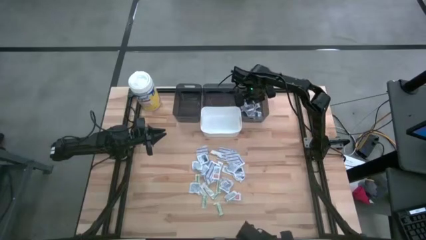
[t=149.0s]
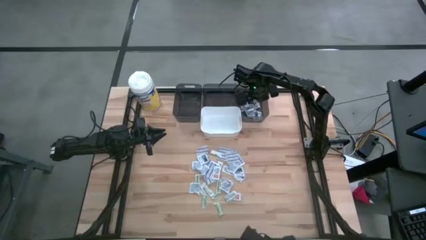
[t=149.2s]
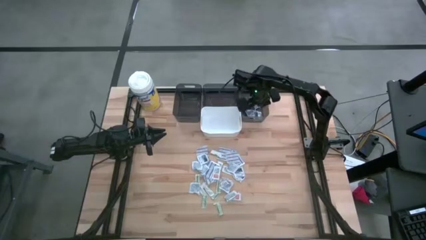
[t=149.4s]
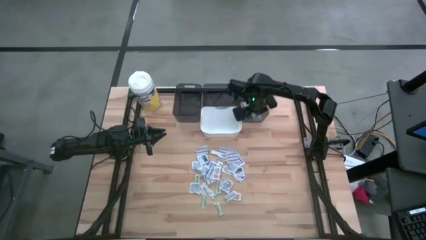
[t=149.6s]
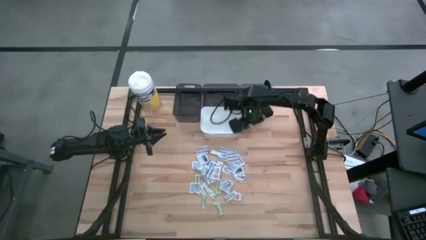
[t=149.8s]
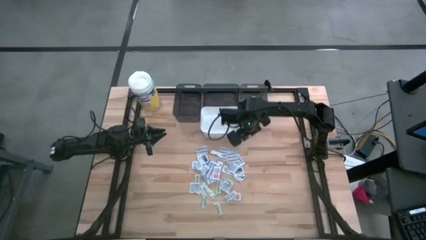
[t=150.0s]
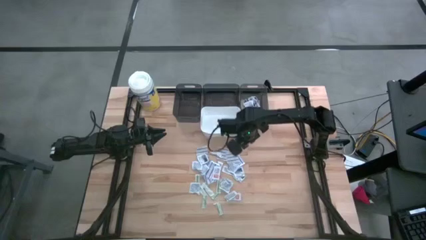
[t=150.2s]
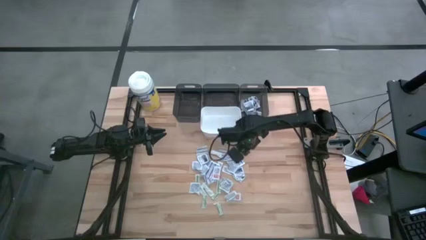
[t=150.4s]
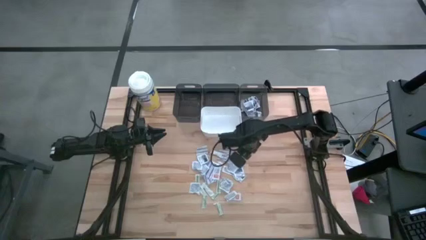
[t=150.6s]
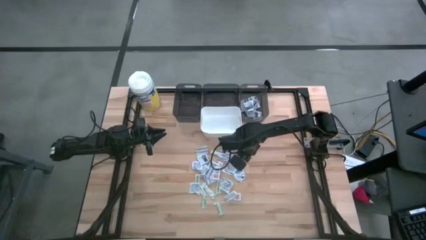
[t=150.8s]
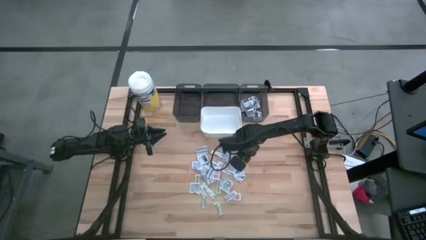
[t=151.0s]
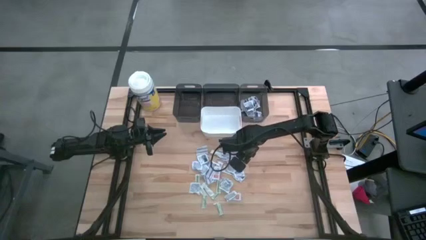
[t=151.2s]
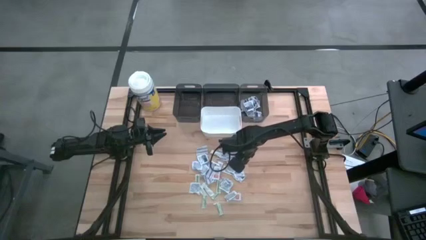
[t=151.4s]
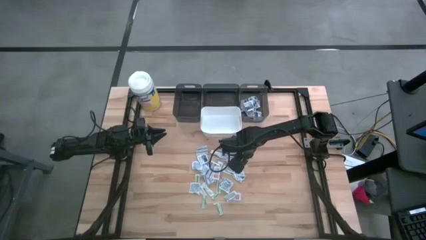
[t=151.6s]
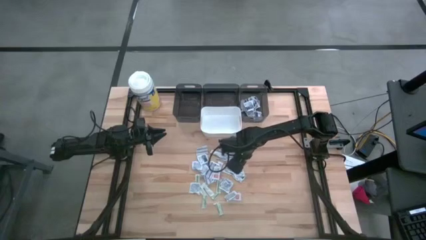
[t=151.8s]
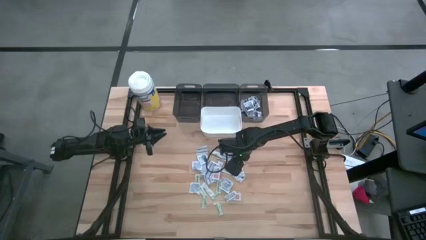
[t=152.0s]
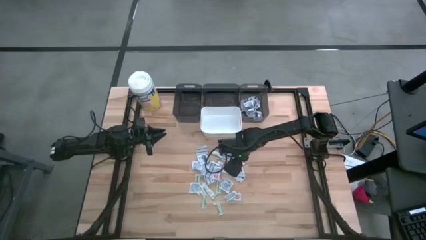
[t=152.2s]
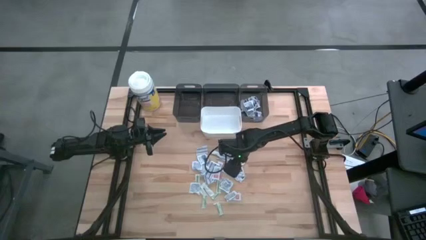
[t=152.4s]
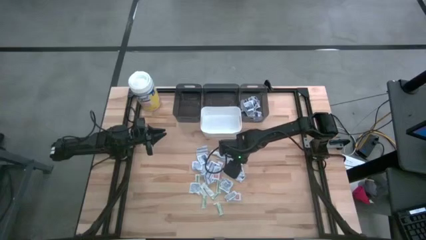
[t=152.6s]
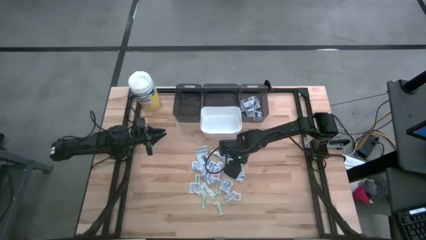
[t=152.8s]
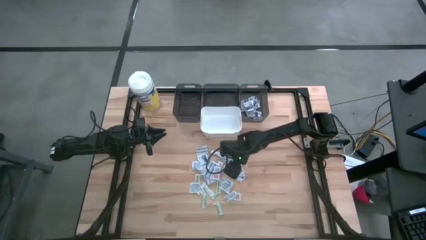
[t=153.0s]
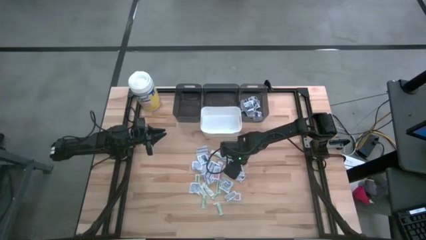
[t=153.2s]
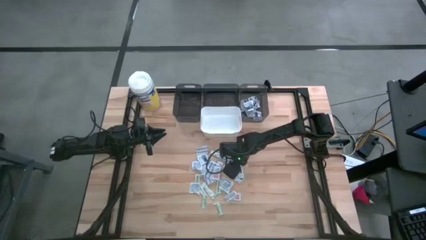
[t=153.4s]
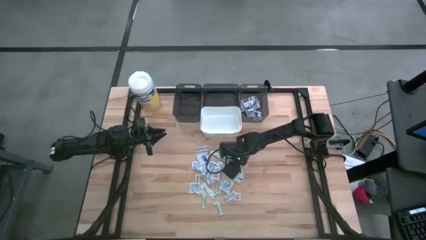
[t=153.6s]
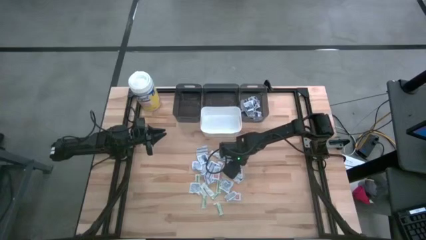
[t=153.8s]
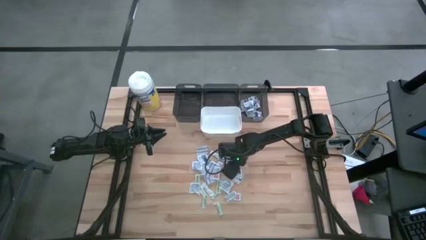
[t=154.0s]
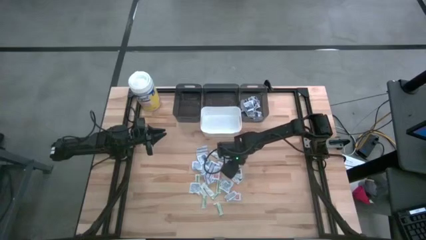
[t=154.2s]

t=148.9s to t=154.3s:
Task: Pick & Place First Aid Supplies
Put the blue alcohol pad into the right black bin

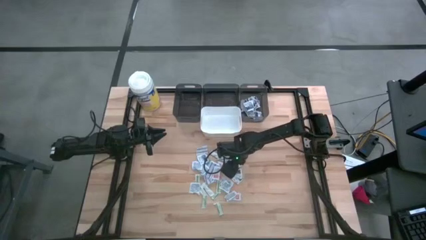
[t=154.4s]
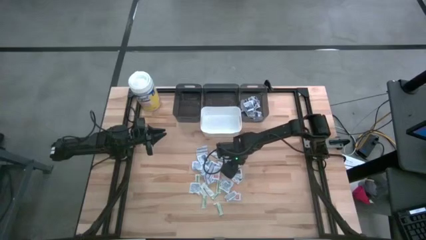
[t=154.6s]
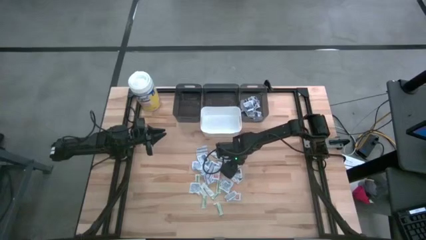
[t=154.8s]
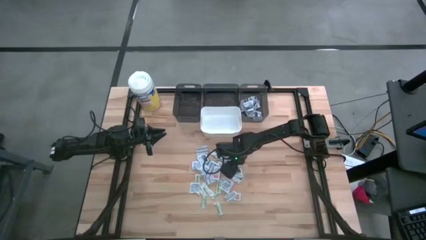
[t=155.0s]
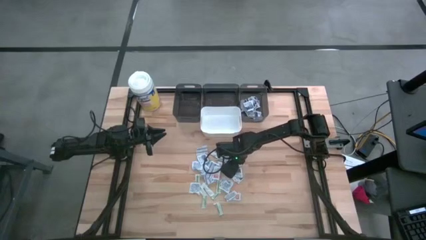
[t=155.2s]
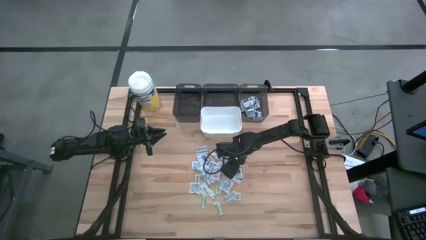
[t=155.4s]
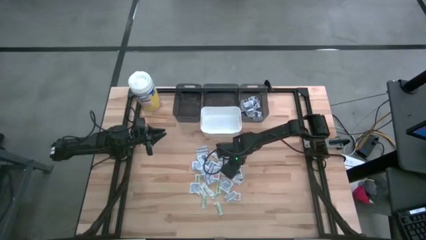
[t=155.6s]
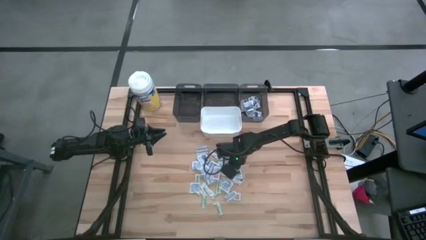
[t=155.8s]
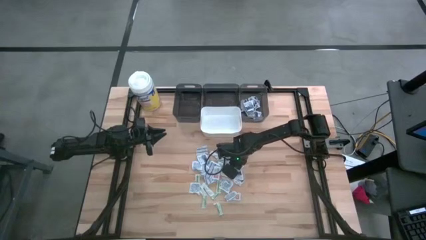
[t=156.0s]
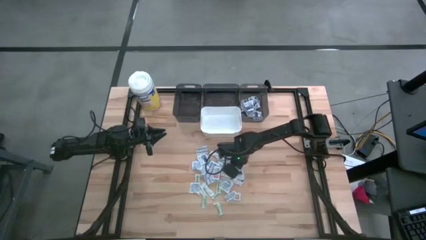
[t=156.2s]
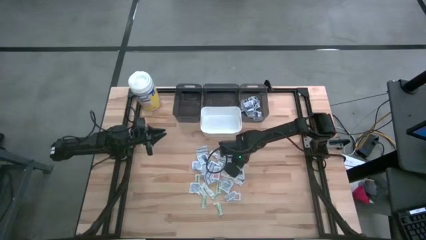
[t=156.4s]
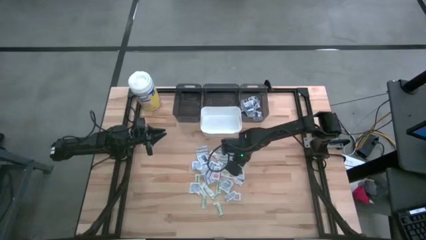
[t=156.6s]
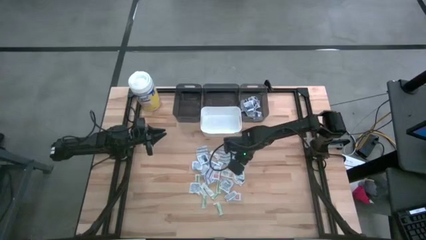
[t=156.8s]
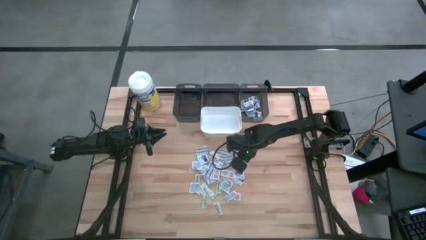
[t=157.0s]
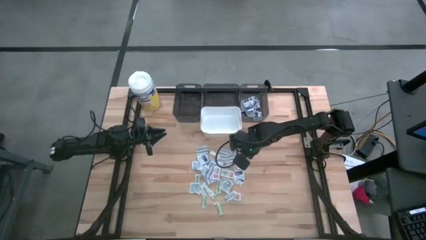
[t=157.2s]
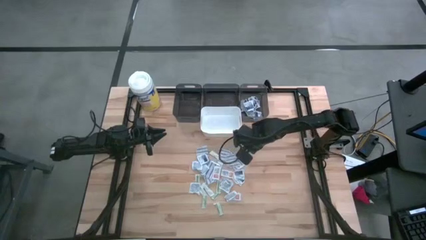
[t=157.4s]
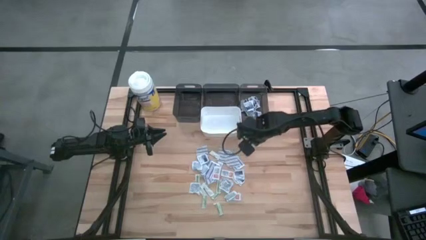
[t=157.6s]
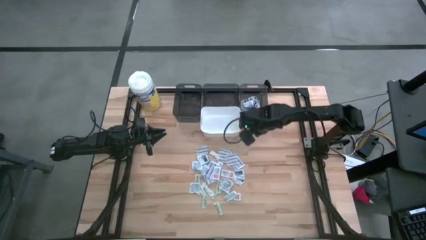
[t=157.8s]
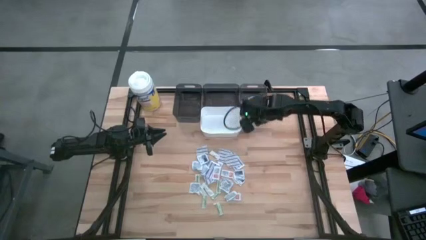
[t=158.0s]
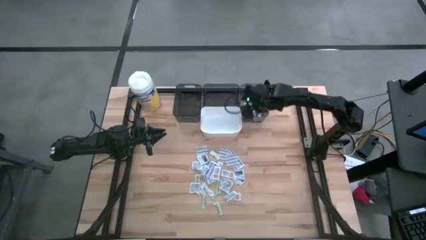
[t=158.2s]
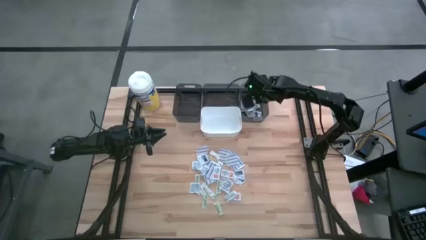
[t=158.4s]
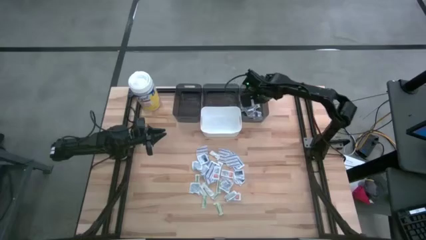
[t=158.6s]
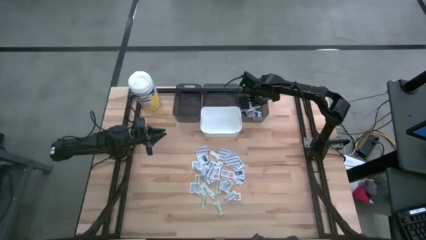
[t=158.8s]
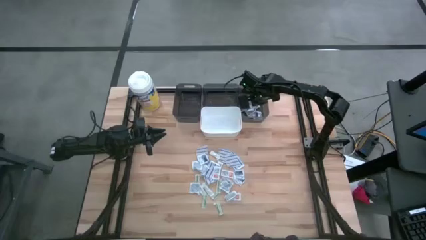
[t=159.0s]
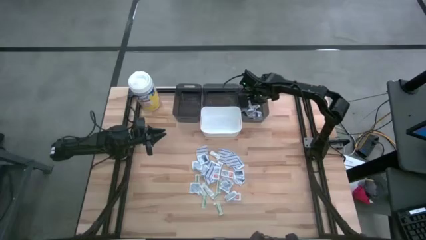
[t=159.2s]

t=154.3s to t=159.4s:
Put the blue alcohol pad into the right black bin

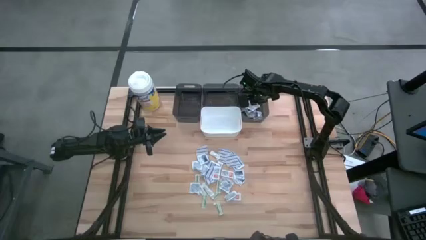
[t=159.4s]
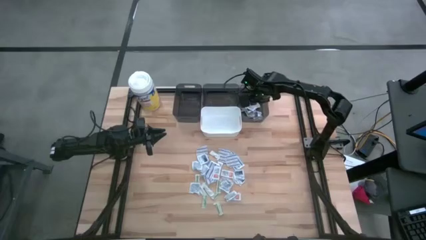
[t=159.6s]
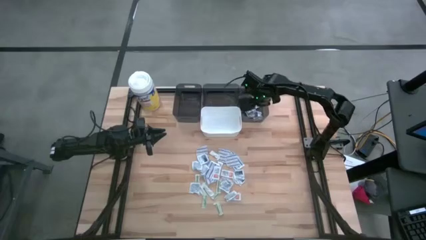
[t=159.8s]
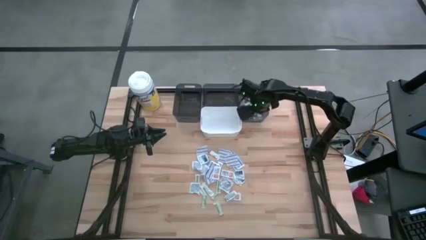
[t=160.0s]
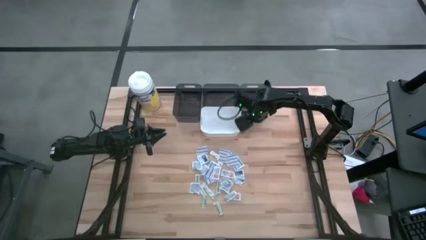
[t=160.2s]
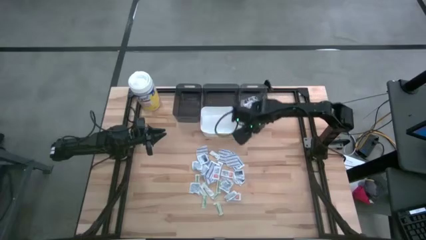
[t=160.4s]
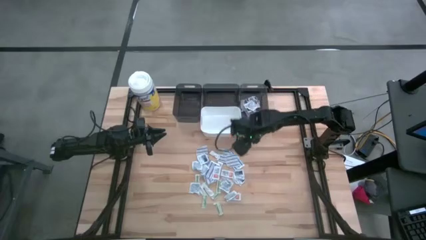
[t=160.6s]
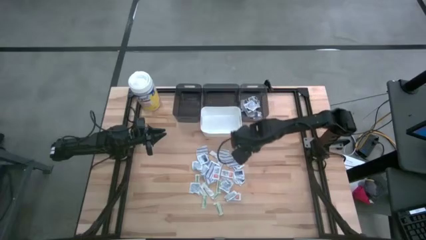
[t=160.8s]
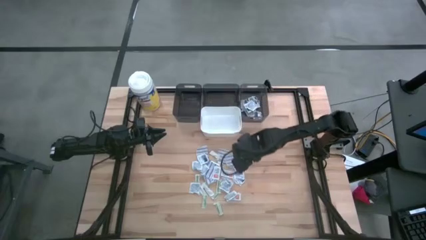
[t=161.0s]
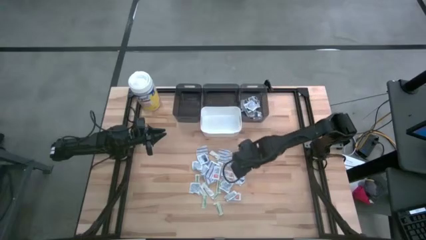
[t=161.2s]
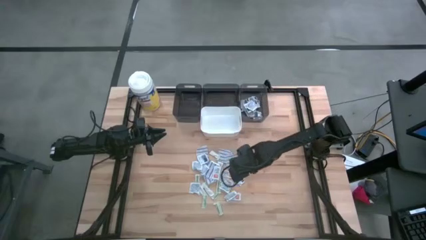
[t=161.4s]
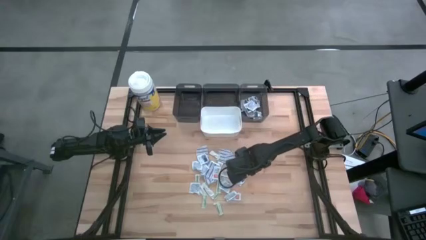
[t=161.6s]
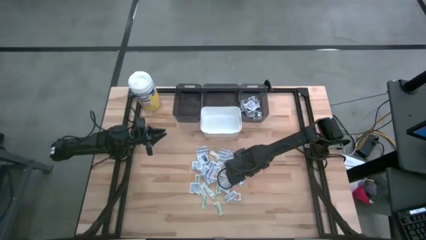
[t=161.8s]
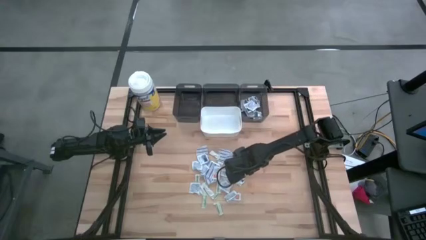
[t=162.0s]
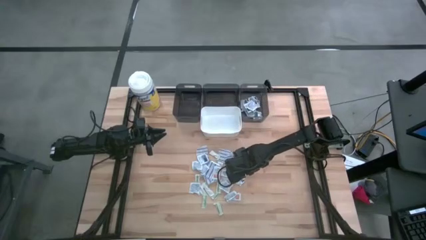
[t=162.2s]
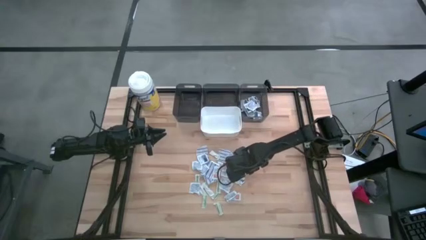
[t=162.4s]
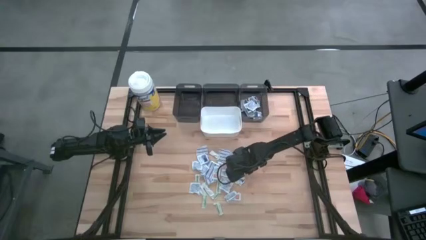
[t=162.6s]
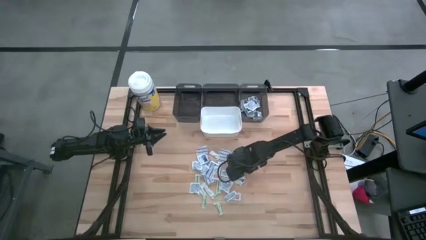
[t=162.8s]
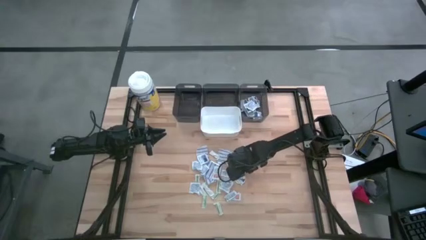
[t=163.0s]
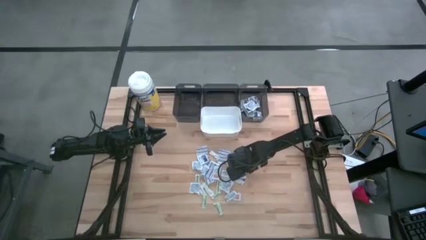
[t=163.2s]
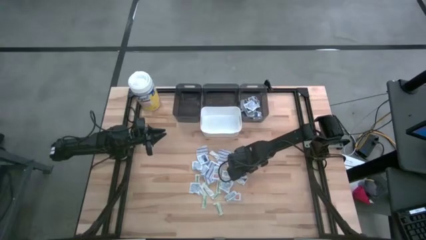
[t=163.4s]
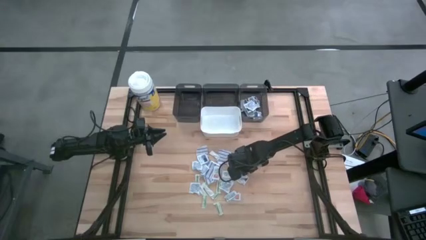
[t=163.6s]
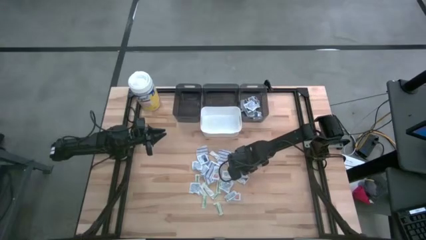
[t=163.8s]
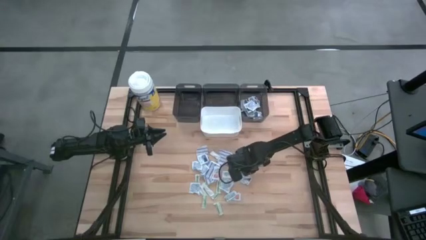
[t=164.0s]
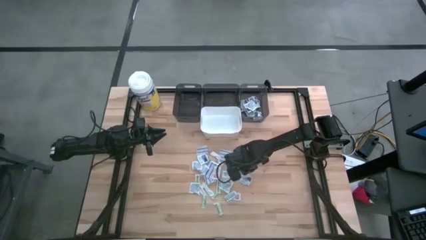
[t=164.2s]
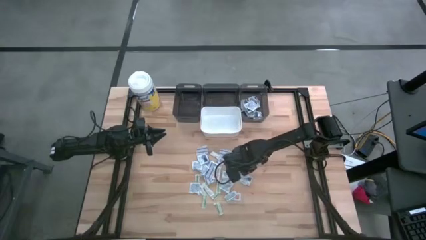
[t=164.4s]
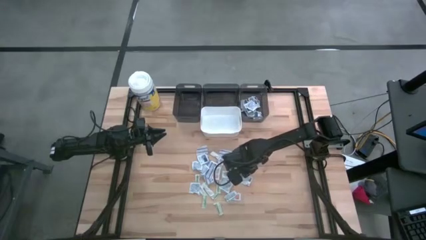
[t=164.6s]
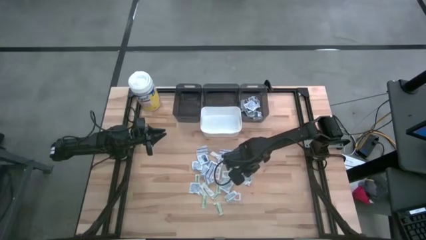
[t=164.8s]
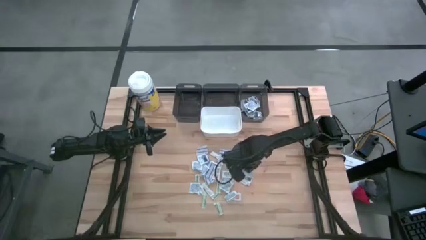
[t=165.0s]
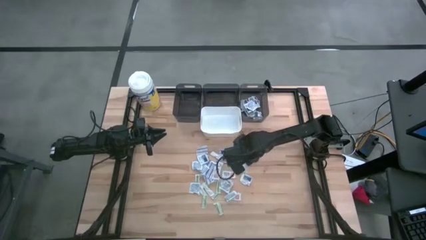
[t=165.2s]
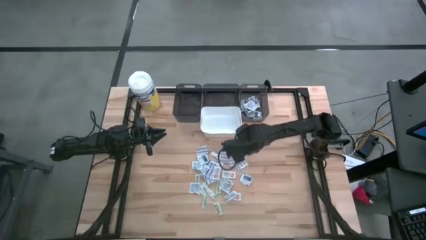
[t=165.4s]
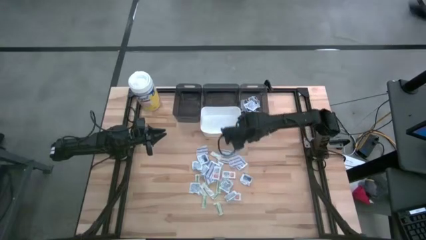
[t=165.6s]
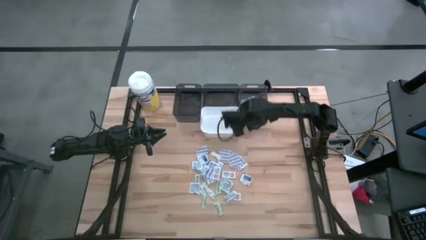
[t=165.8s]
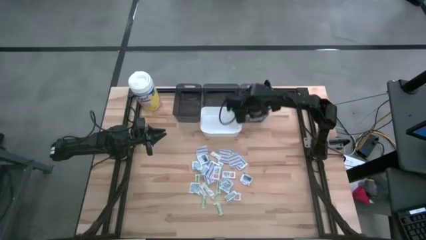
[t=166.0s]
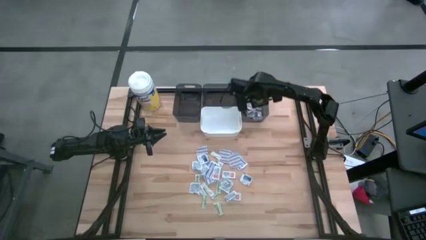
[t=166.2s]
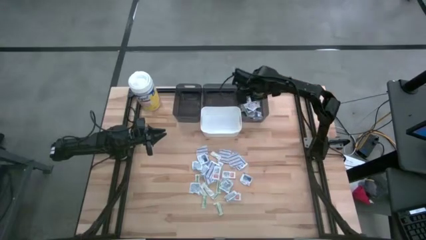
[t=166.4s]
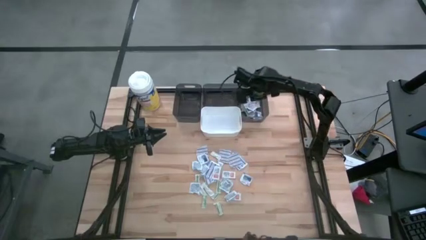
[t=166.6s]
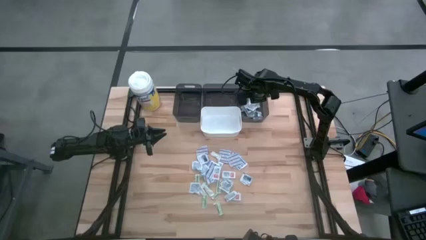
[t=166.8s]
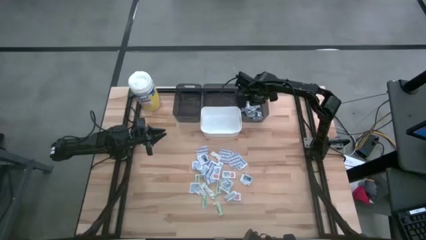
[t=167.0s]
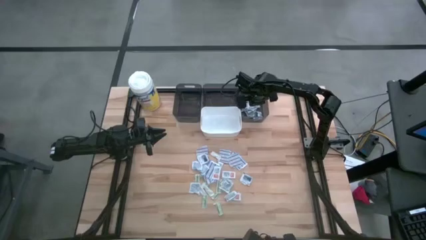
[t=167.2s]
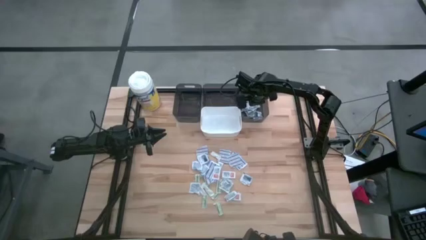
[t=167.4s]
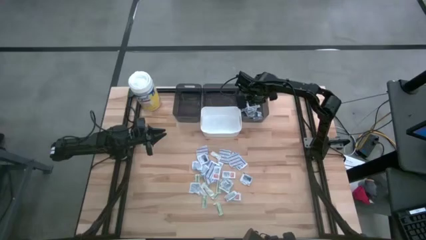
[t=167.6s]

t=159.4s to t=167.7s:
Put the blue alcohol pad into the right black bin
